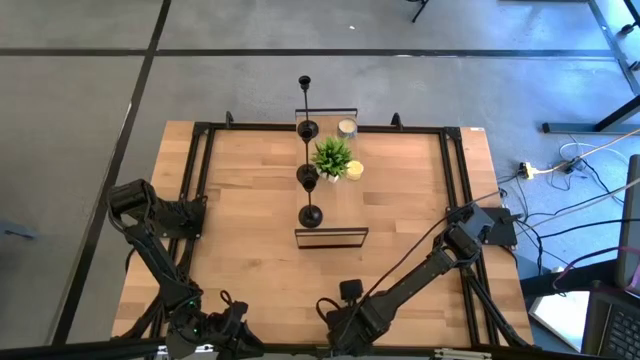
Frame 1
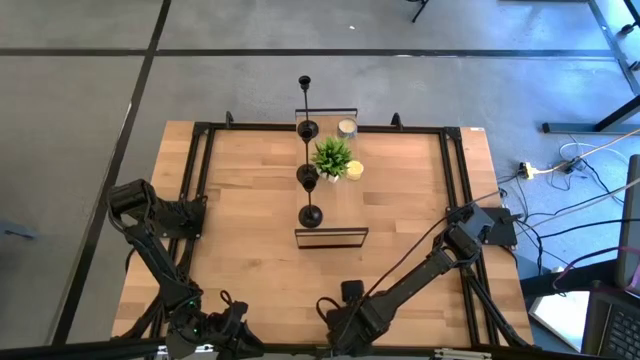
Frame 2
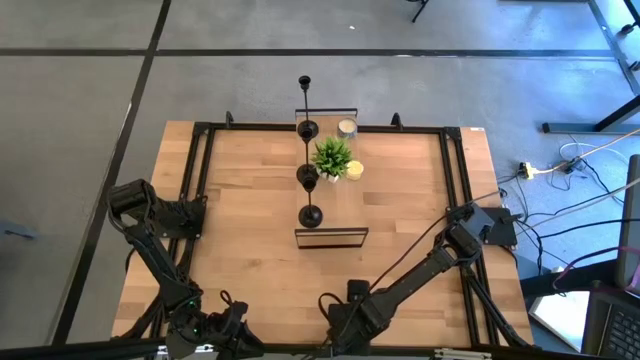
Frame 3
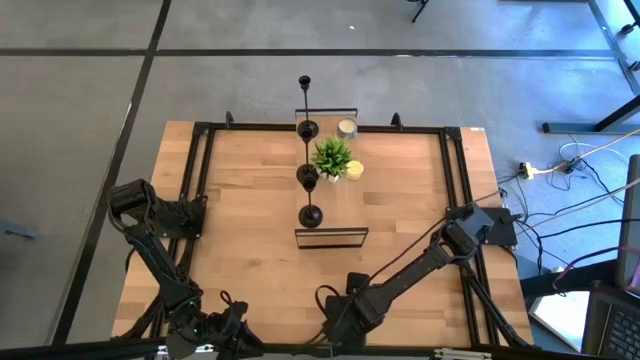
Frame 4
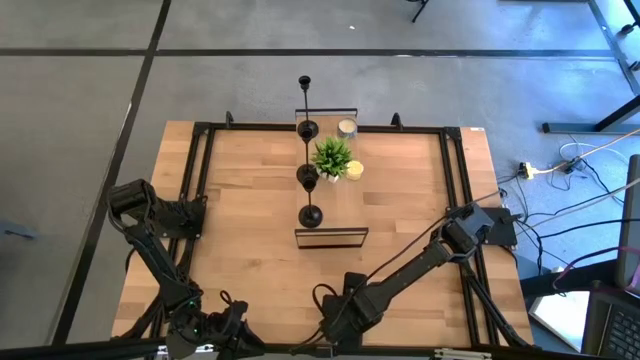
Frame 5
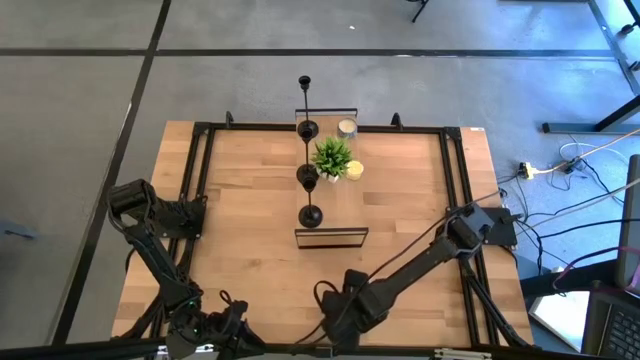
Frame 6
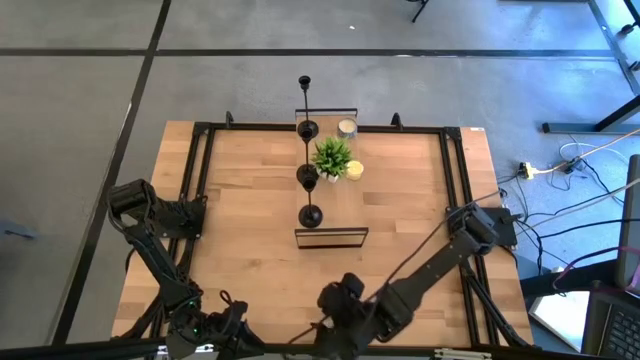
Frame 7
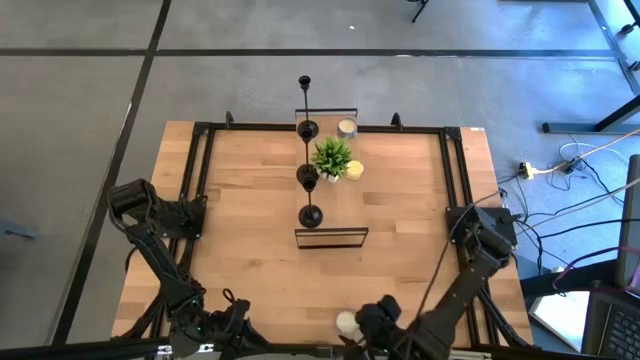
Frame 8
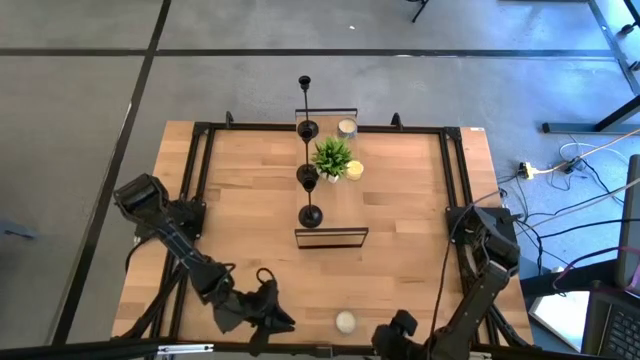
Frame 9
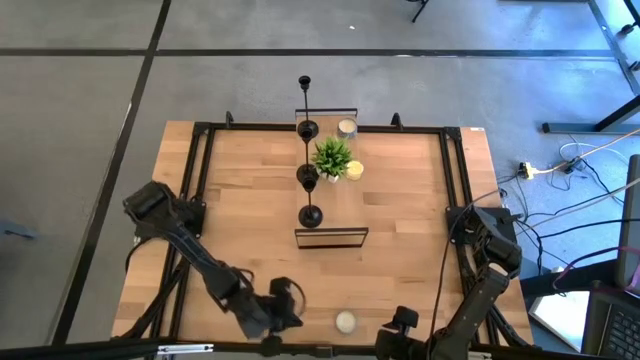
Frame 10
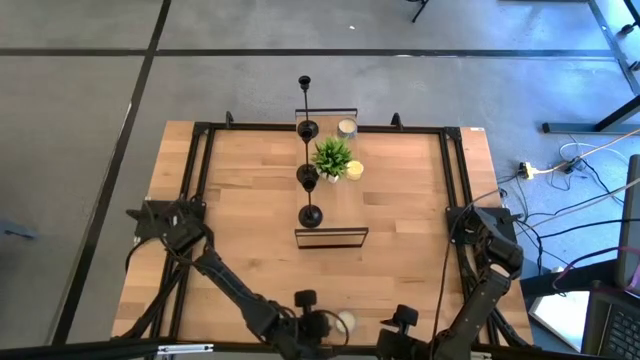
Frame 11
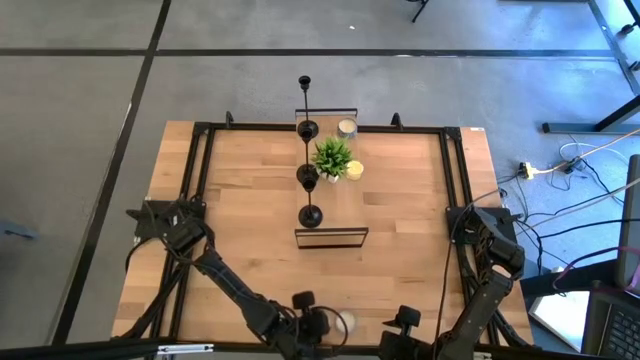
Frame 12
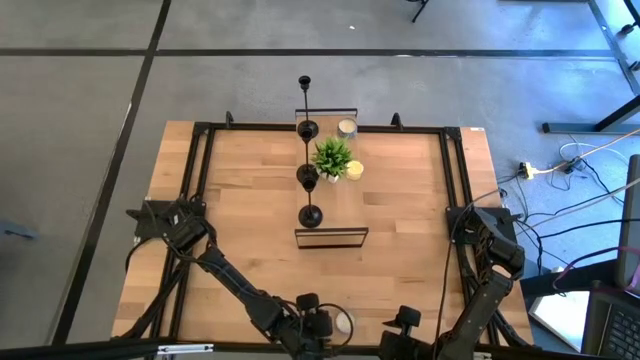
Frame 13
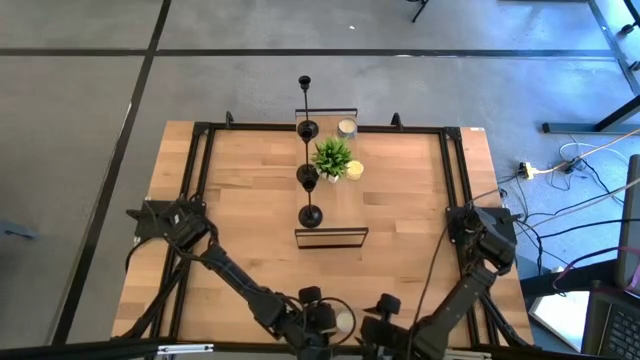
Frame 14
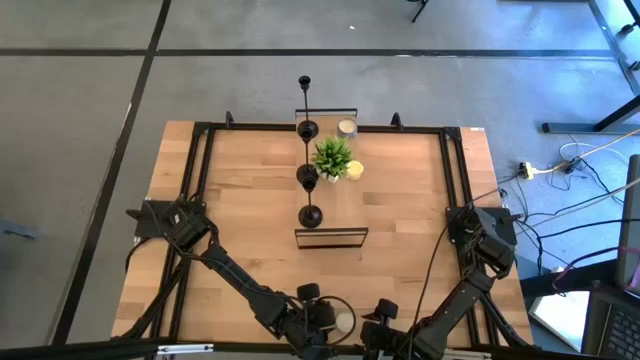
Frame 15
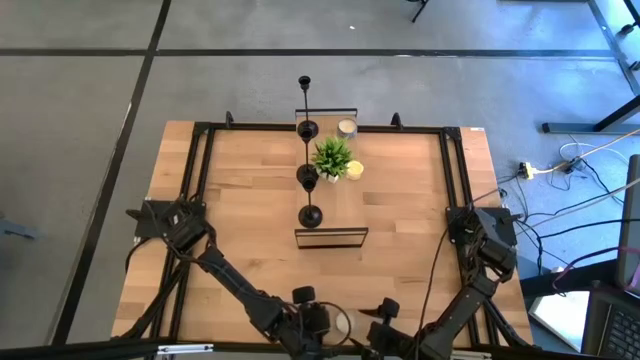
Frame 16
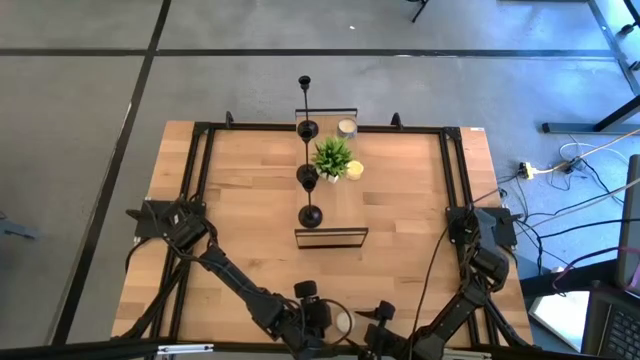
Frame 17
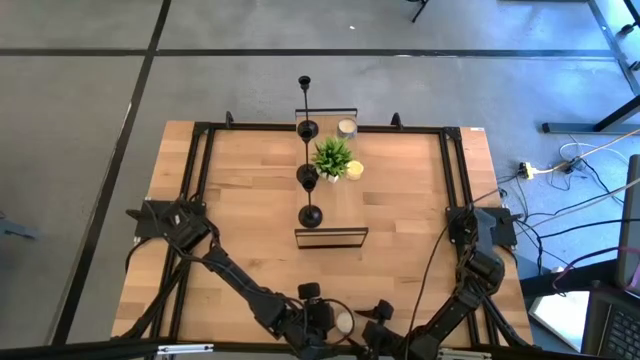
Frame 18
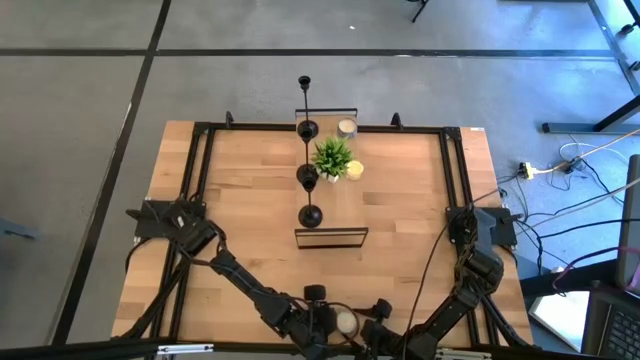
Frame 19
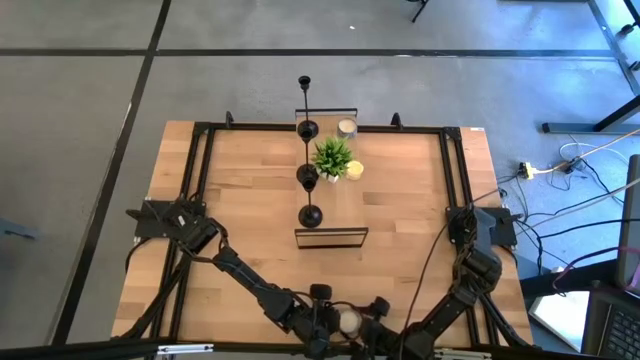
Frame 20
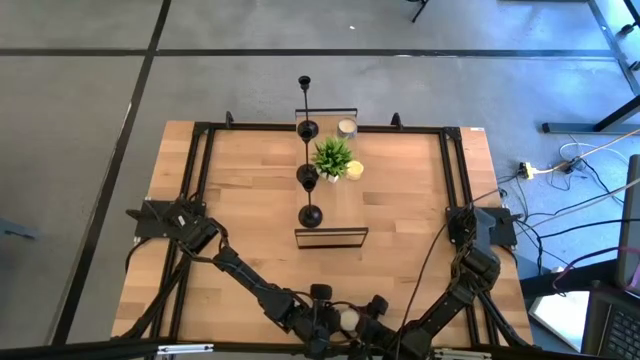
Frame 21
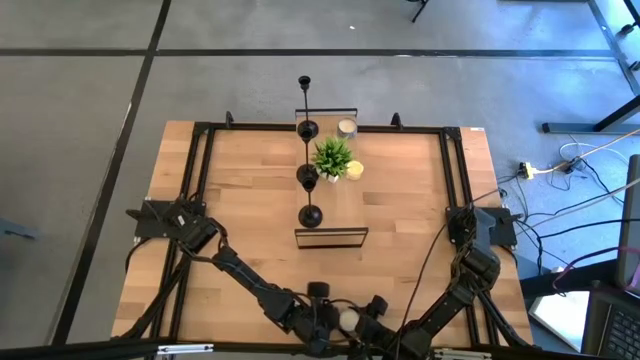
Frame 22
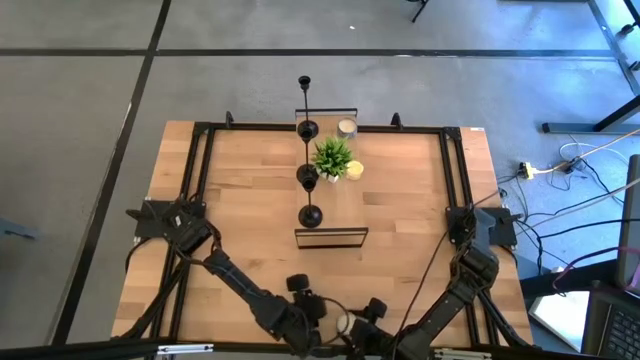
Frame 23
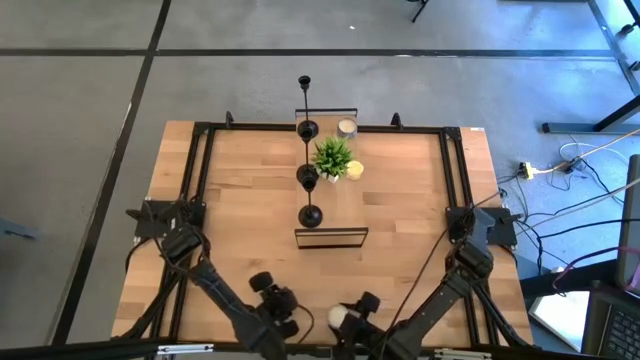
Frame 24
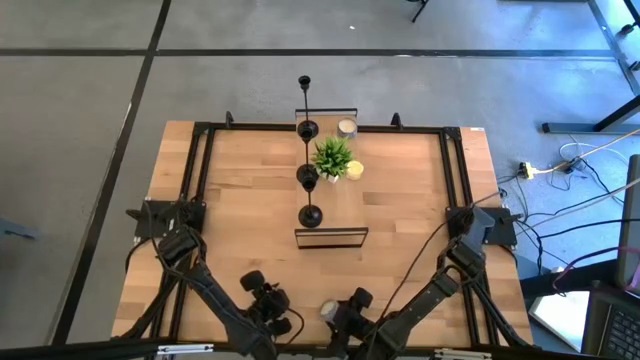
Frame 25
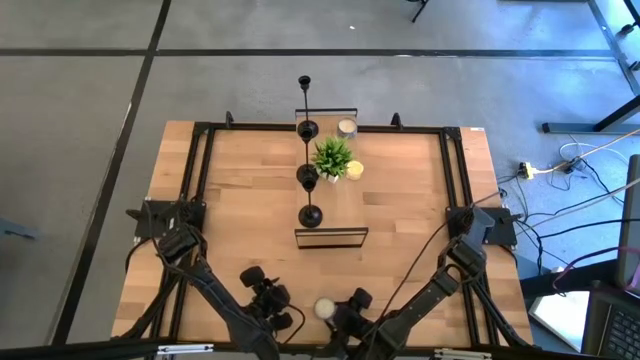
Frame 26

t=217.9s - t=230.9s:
Task: Pick & Place candle stick holders
Put the blue scented candle on the shelf

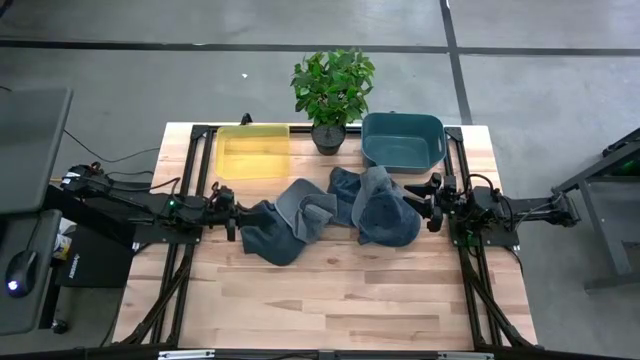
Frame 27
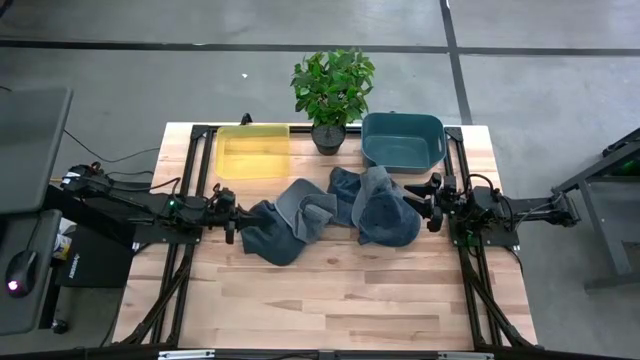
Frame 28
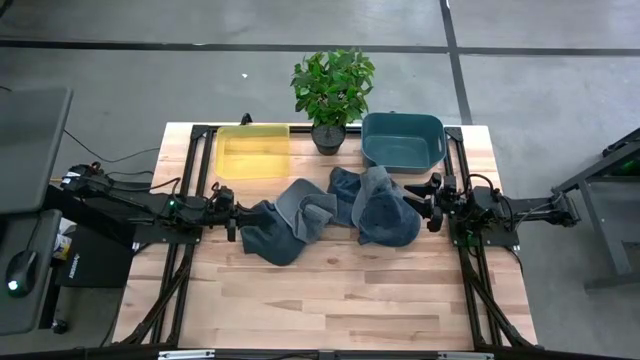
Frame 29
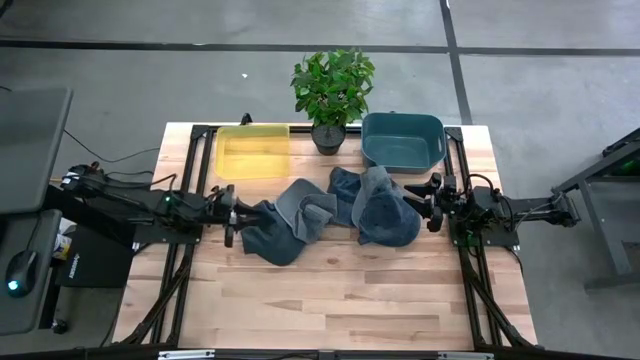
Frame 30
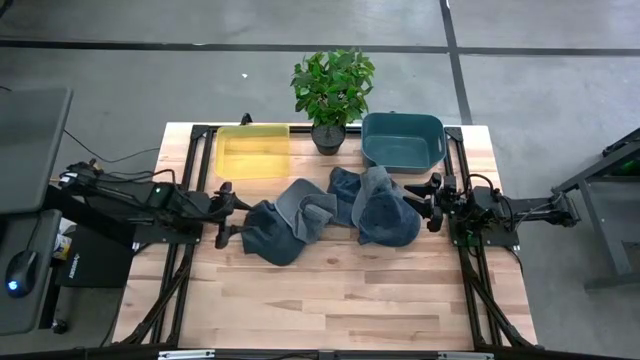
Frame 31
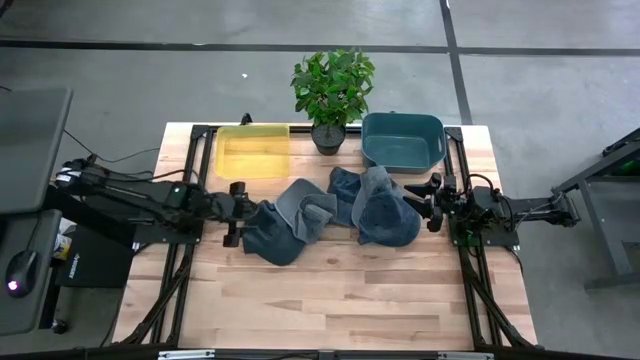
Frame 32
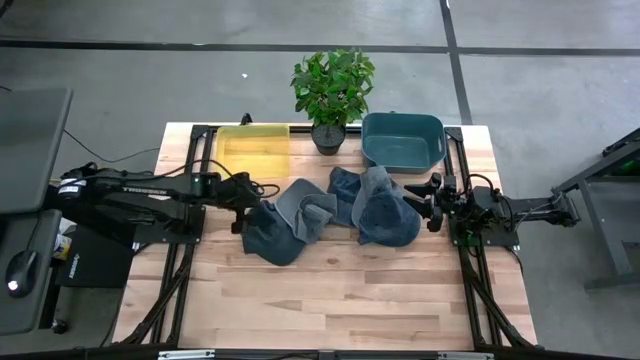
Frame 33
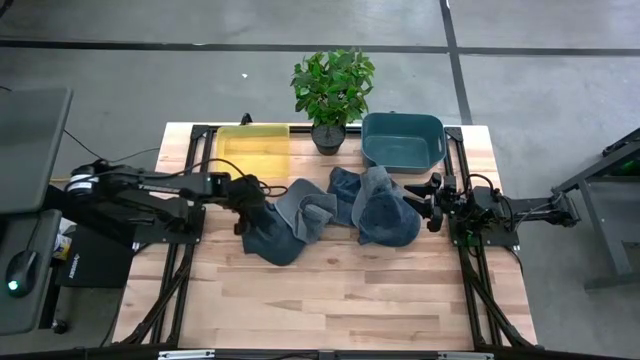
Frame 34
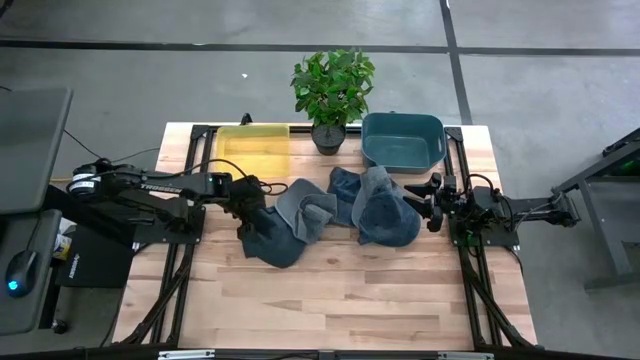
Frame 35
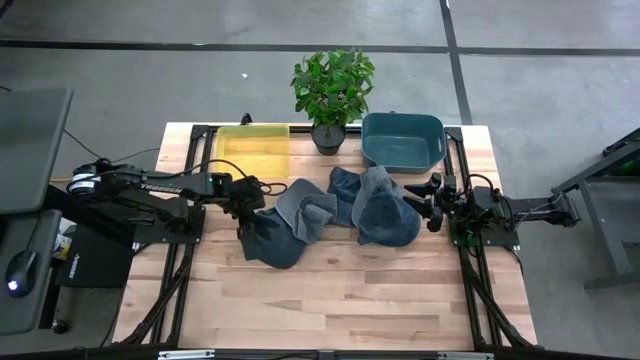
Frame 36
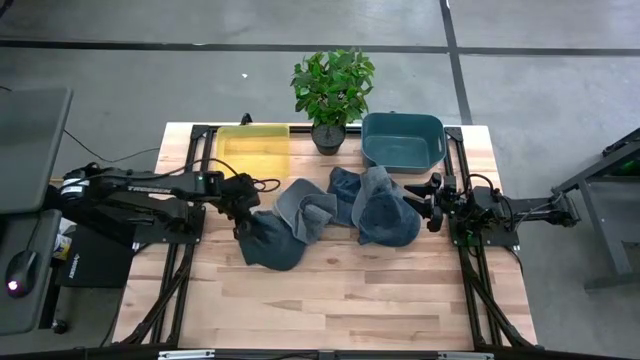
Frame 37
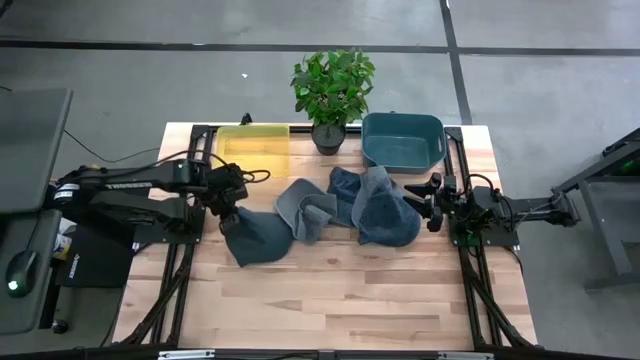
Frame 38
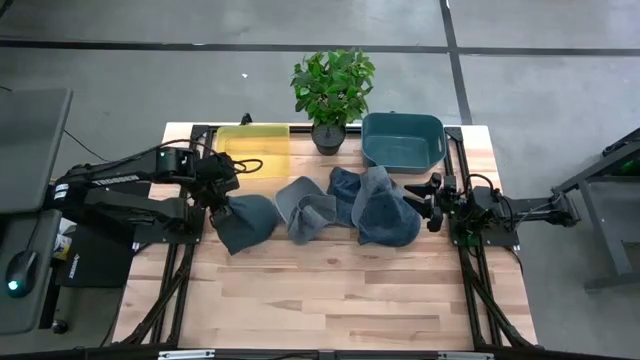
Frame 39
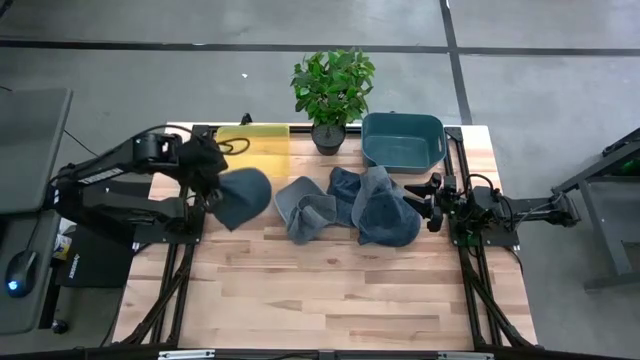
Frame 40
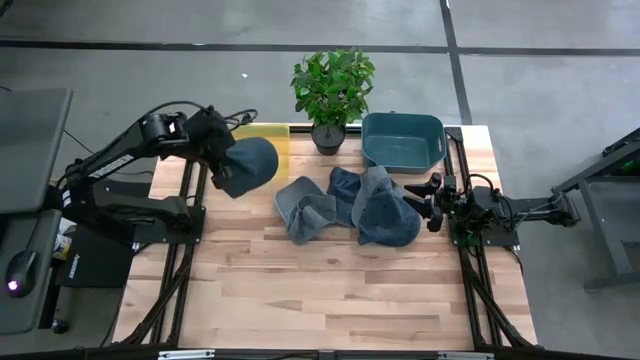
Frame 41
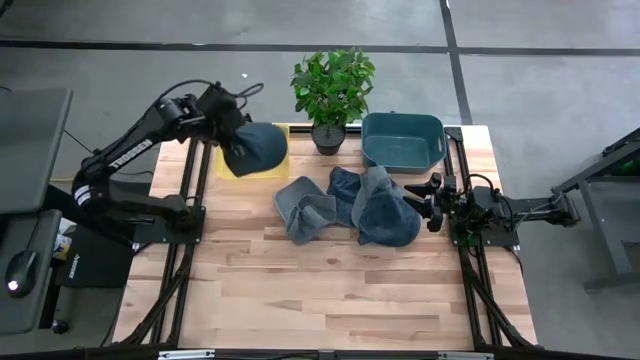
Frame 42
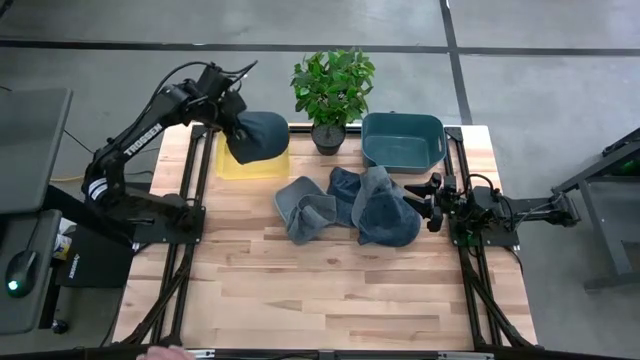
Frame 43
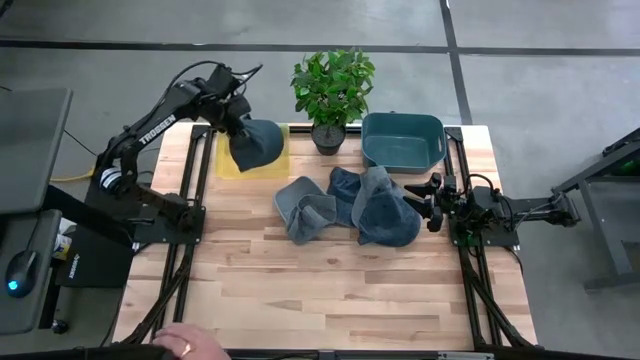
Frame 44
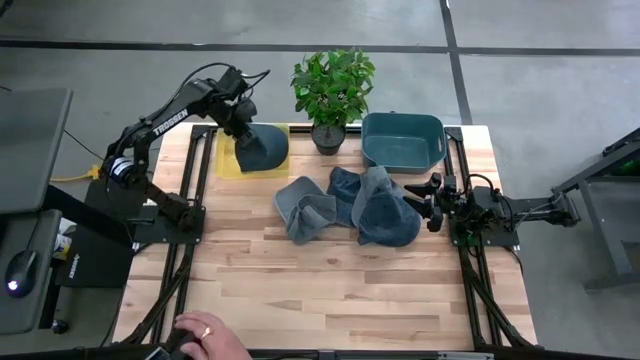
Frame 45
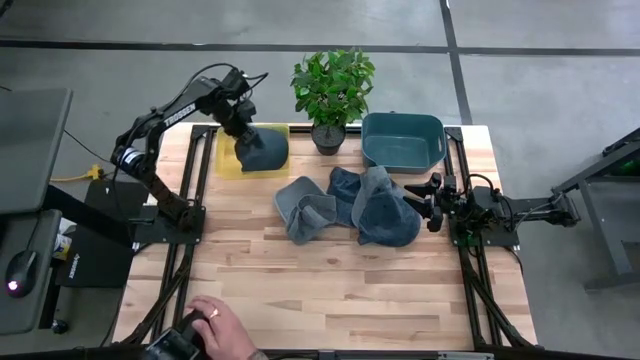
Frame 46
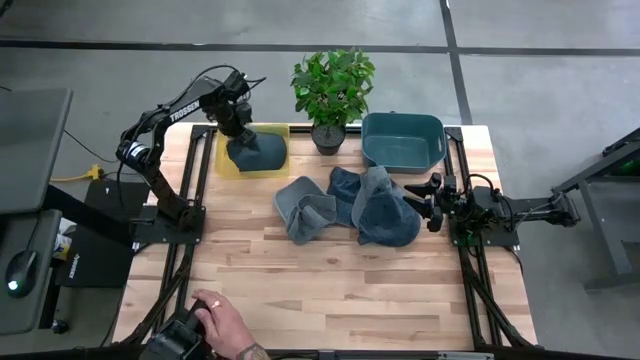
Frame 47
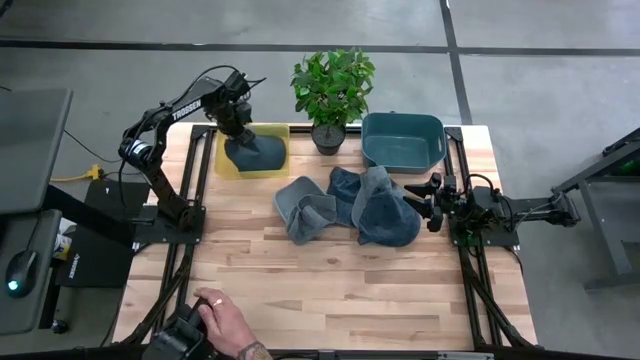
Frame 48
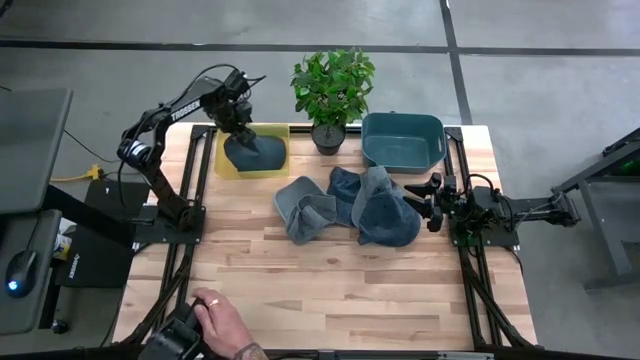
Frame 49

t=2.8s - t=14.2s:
Task: Pick & Place hat
Put the left black cap into the yellow bin
